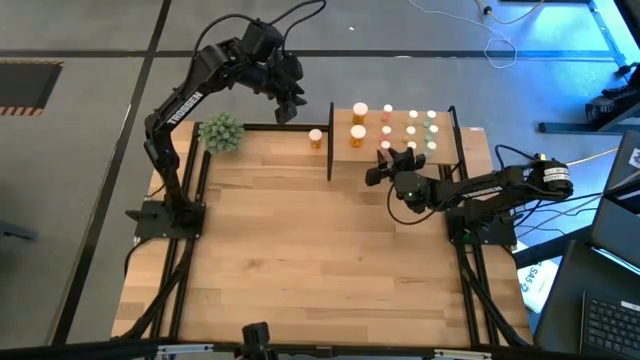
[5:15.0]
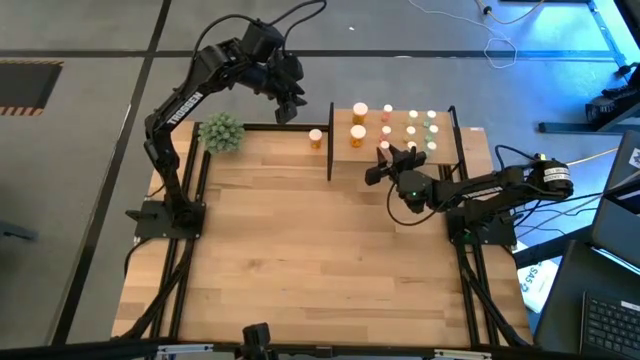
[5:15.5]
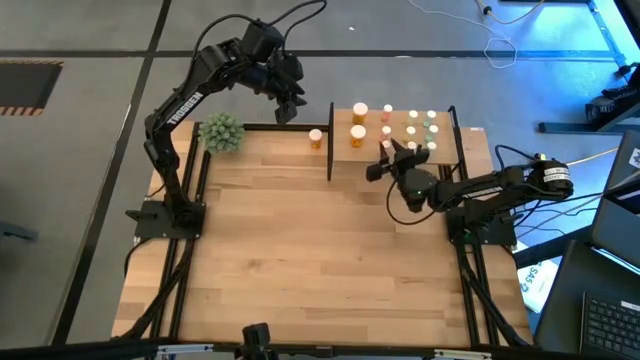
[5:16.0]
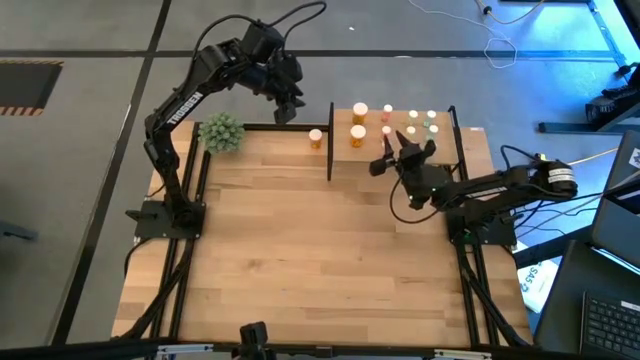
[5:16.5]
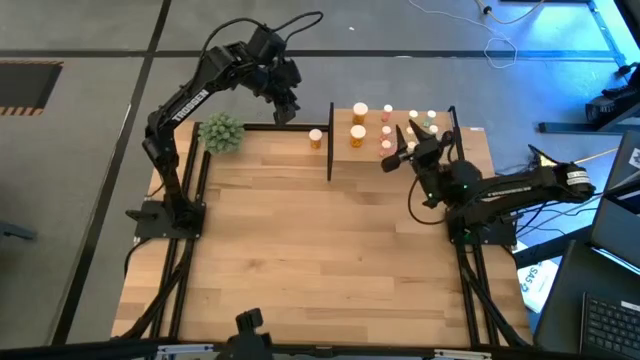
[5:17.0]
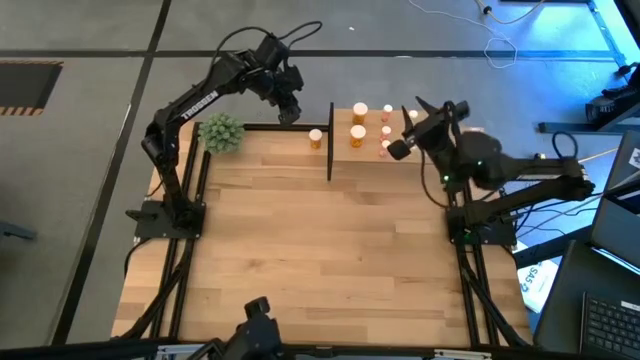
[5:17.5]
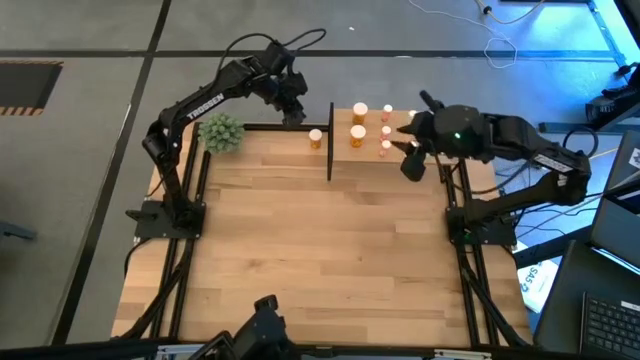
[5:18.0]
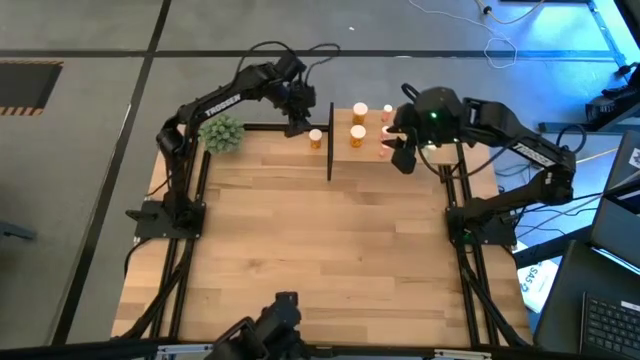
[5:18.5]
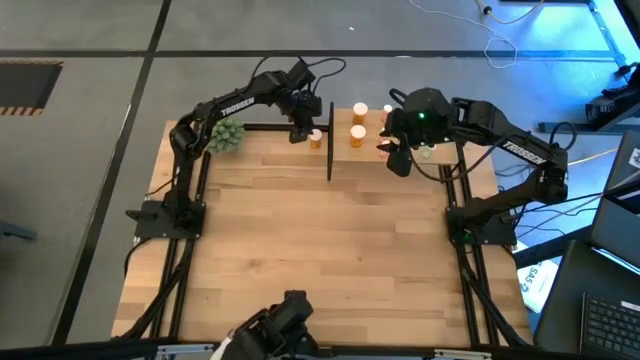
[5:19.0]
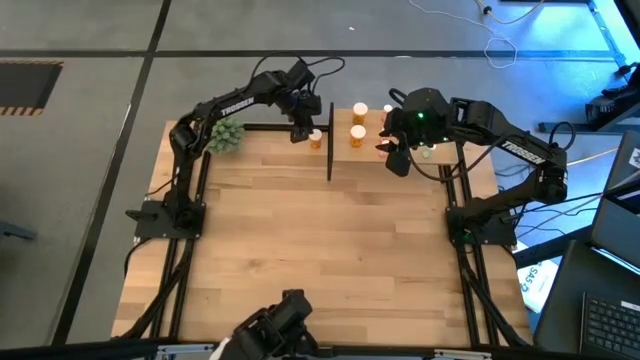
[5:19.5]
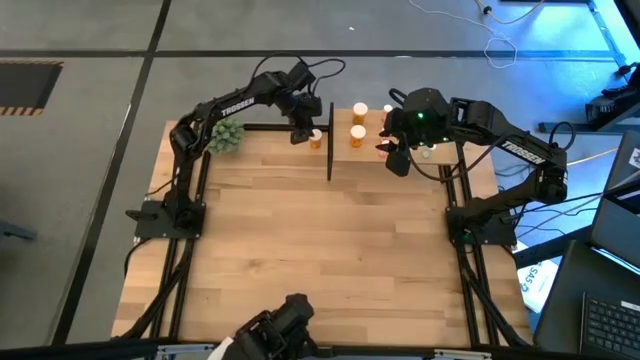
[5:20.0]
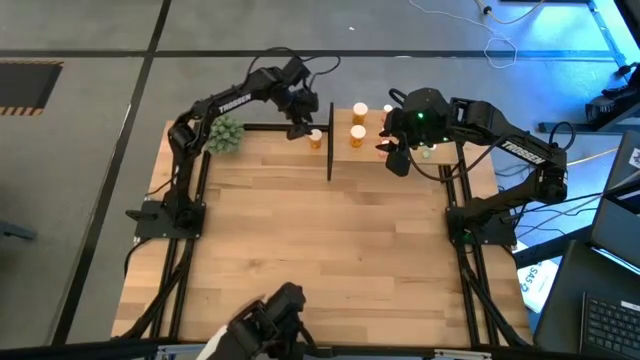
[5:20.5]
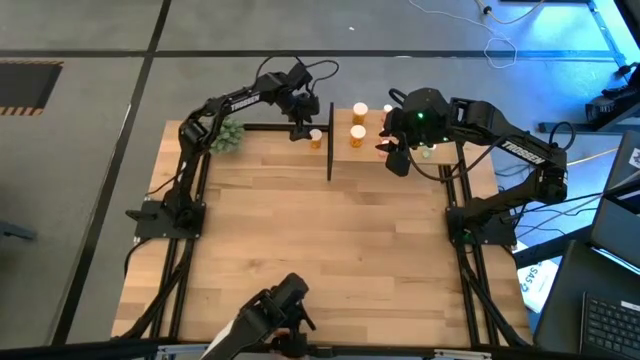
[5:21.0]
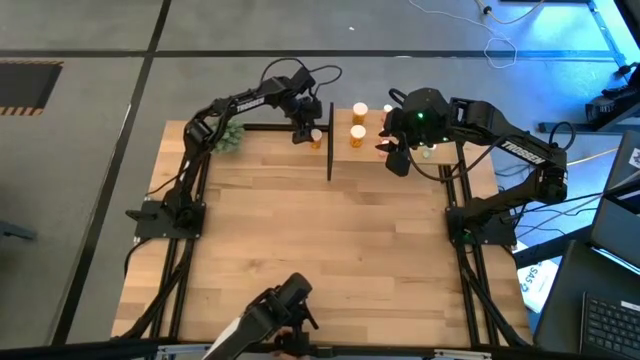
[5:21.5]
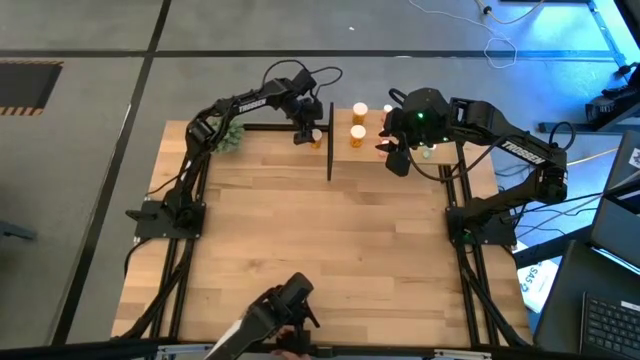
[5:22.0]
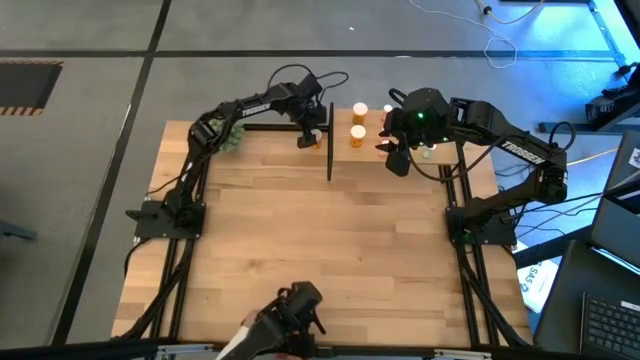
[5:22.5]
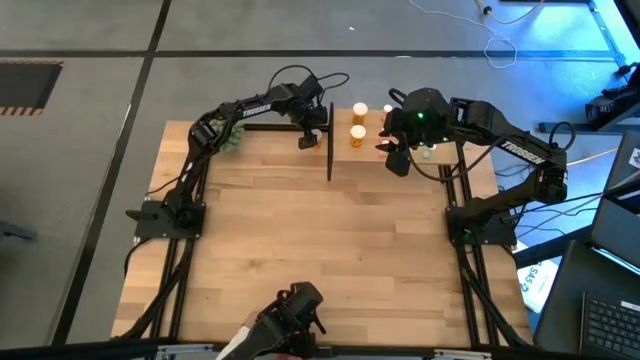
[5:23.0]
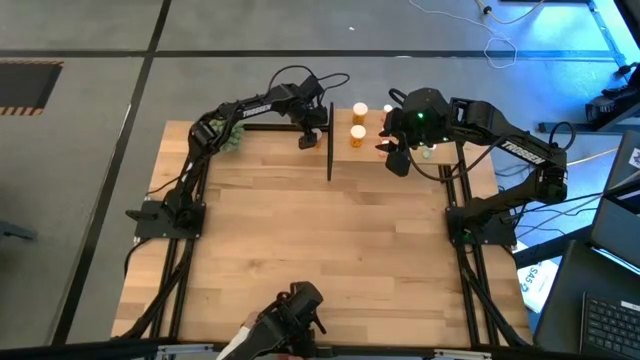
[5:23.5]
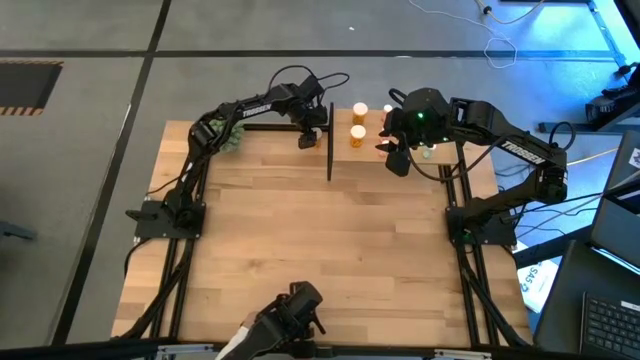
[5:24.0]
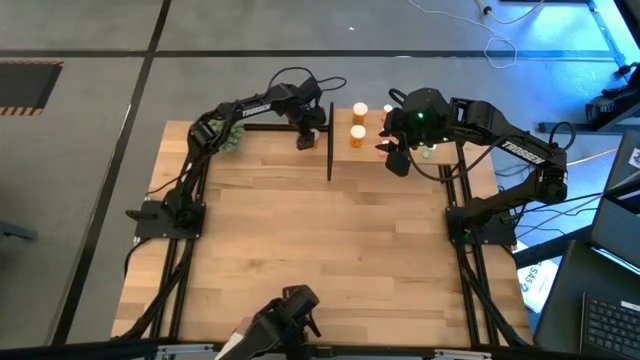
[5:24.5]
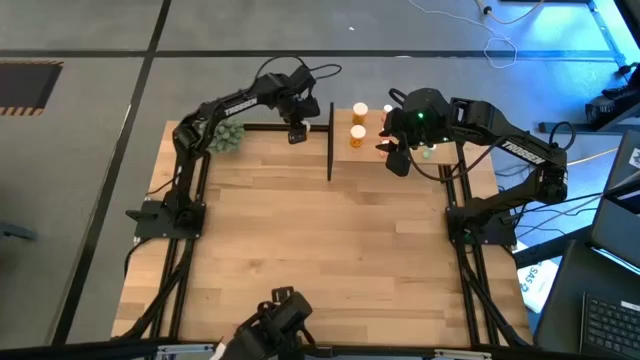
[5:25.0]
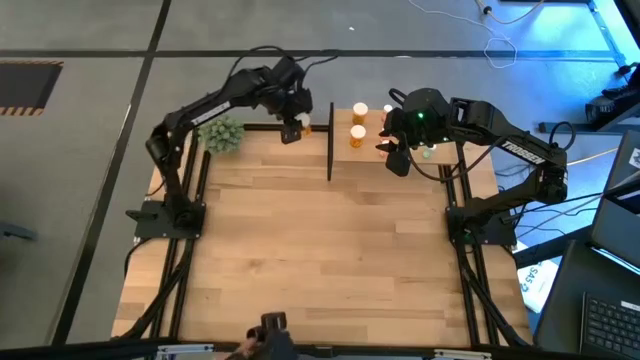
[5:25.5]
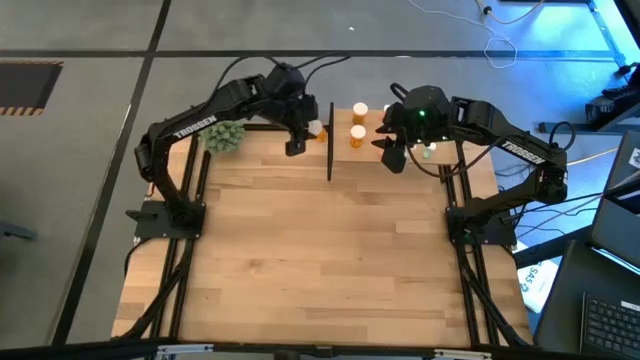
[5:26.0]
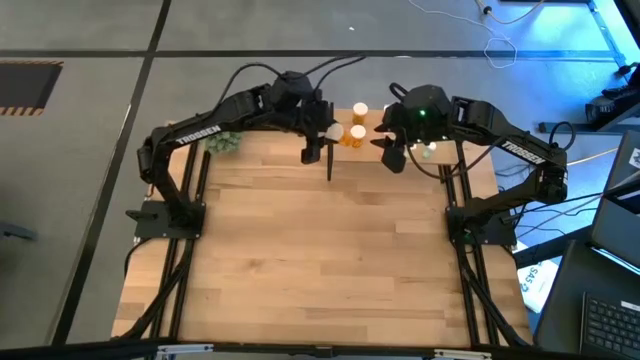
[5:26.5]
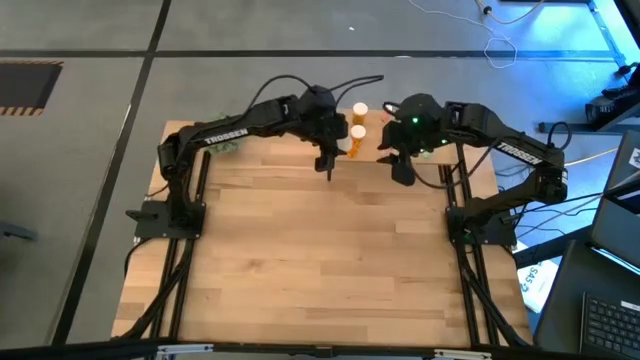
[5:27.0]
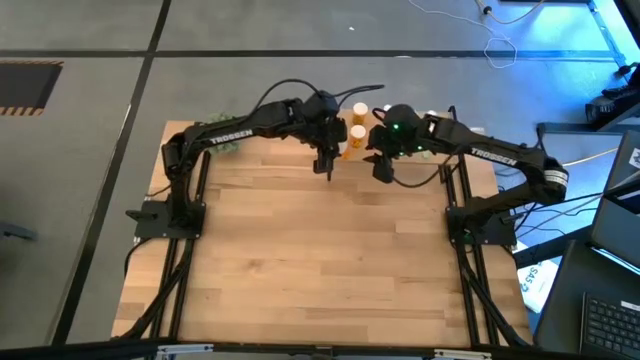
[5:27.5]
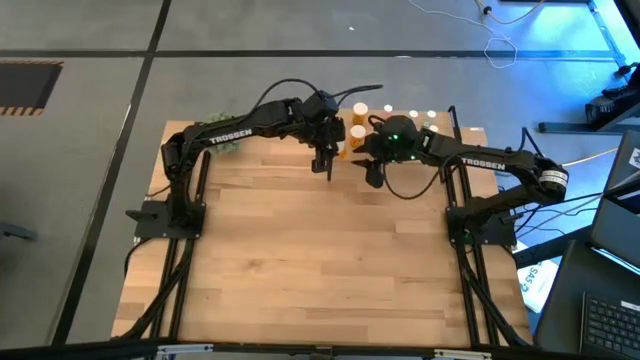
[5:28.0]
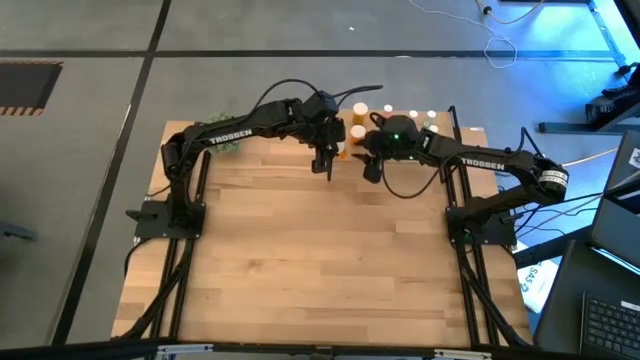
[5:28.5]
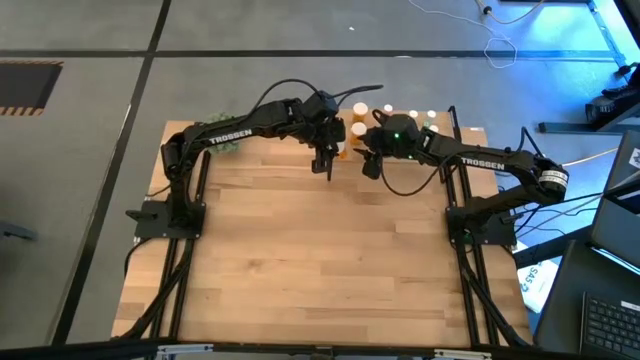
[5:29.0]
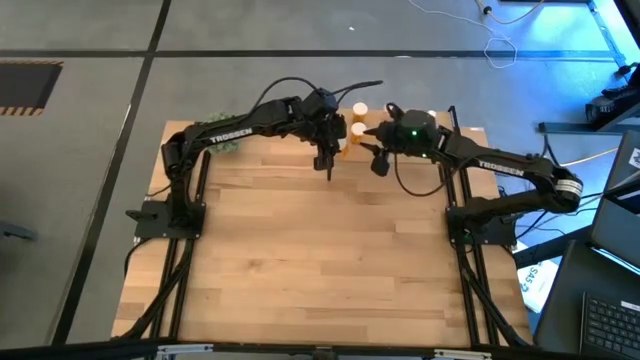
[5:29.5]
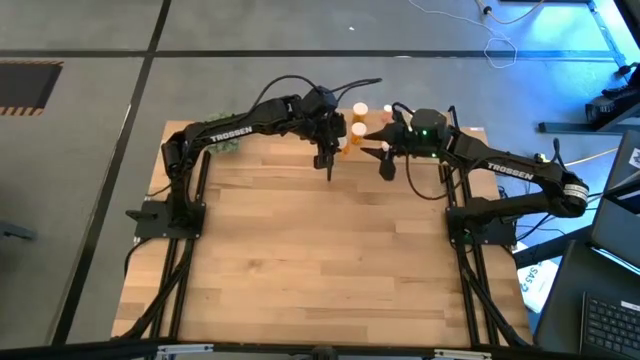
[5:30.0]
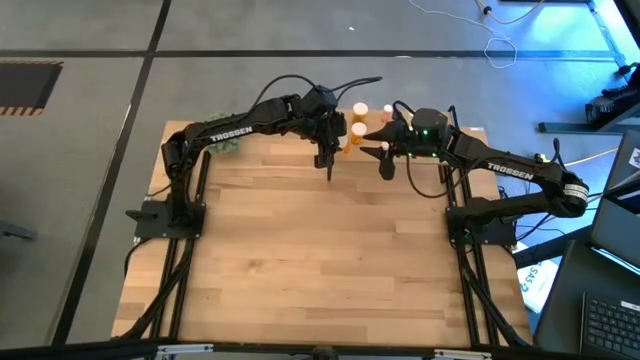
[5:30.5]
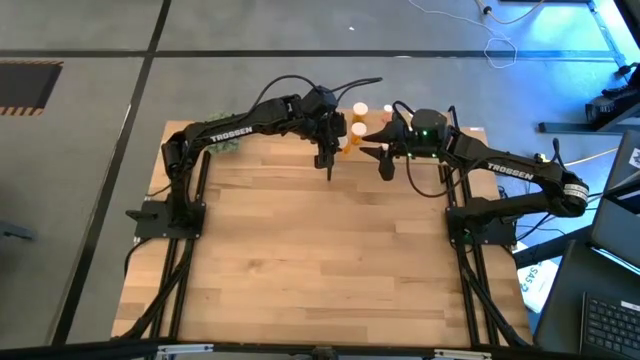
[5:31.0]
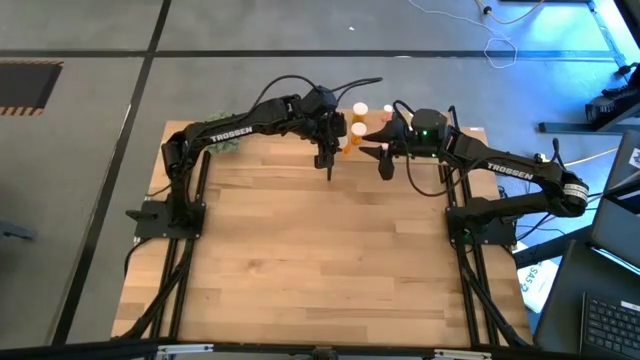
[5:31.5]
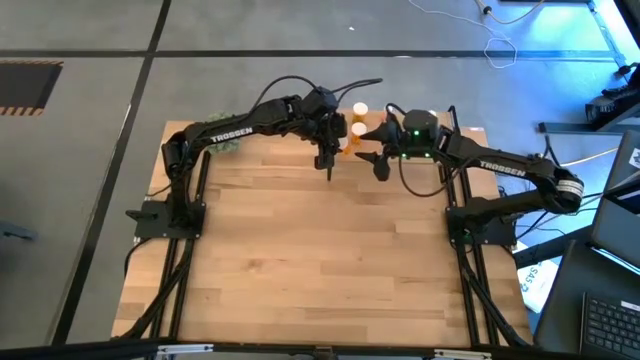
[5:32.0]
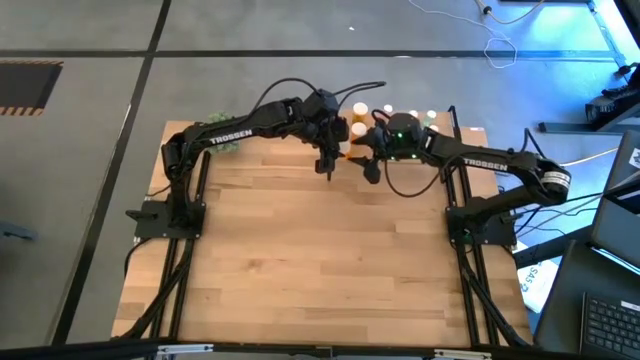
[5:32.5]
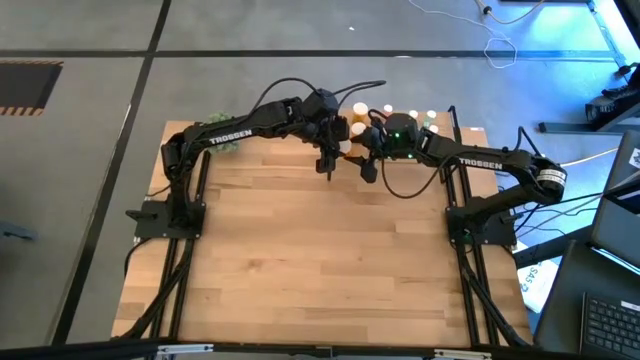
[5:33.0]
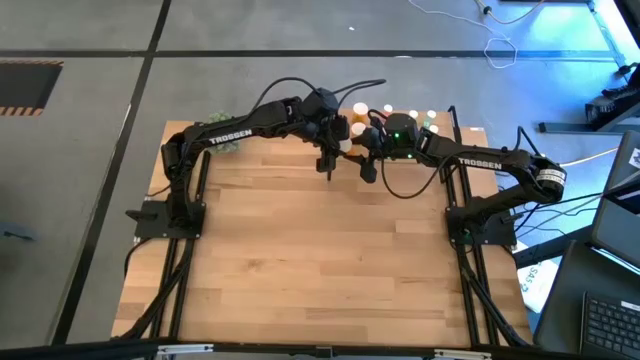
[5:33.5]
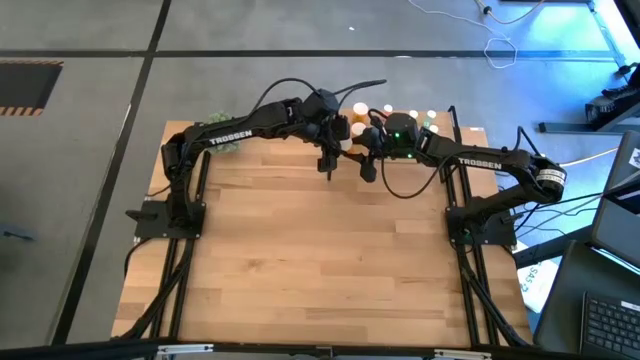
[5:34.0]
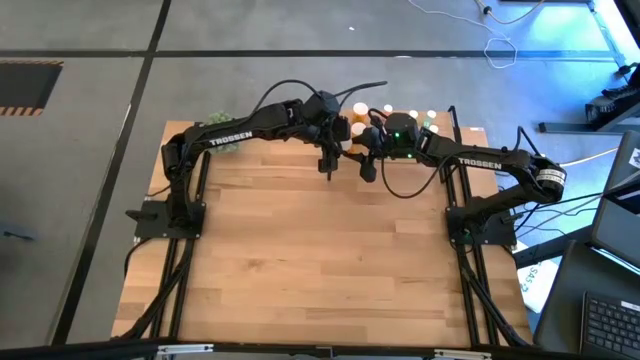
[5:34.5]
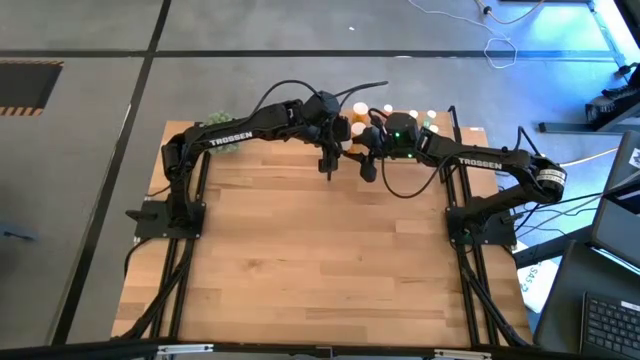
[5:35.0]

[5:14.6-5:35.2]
Task: Pick and place medicine bottles onto shelf by color
Put the orange pill bottle on the shelf aligned with the other orange pill bottles

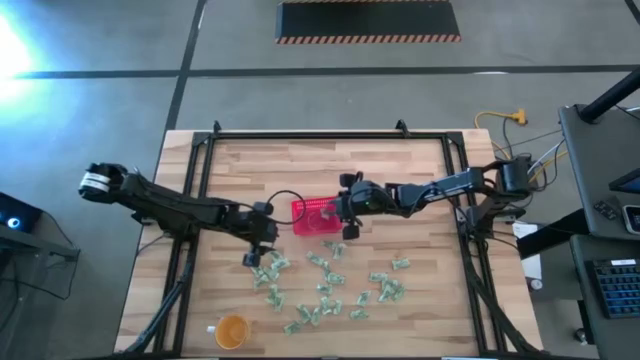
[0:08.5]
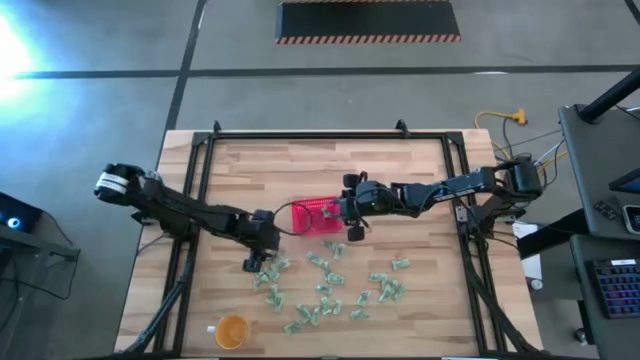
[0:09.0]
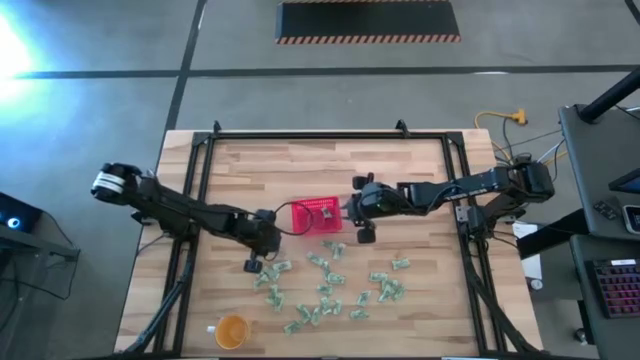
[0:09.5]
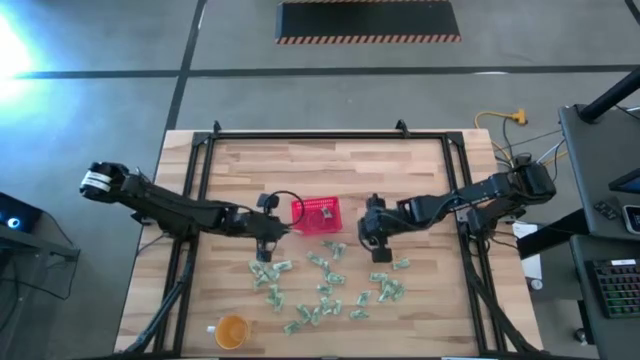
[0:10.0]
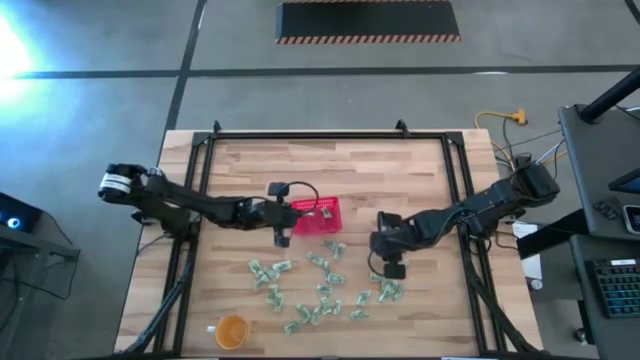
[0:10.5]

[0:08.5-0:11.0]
Task: Pick and place items into bin
Put the stevia packet into the red bin
